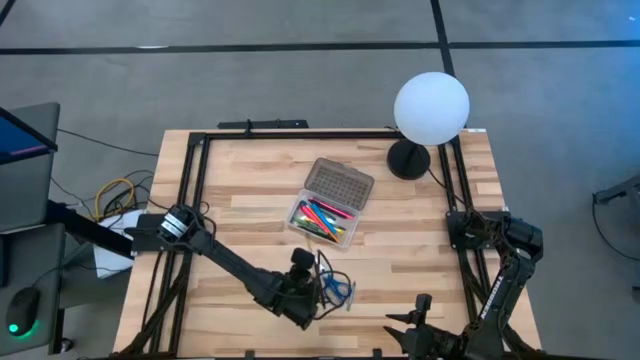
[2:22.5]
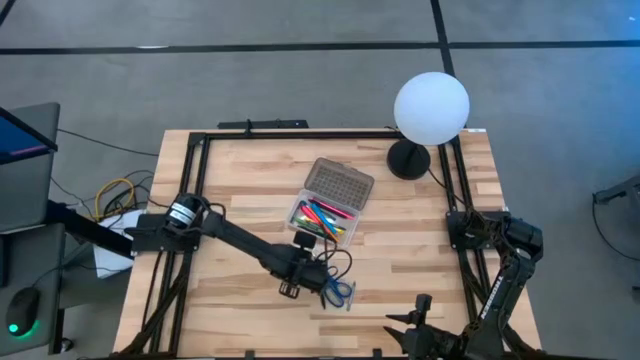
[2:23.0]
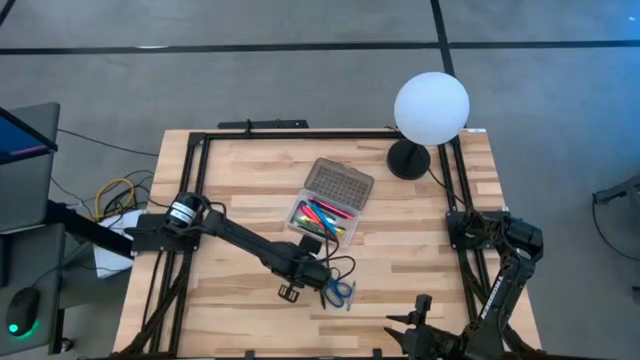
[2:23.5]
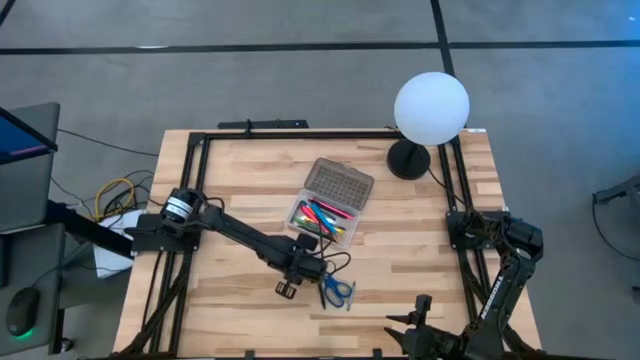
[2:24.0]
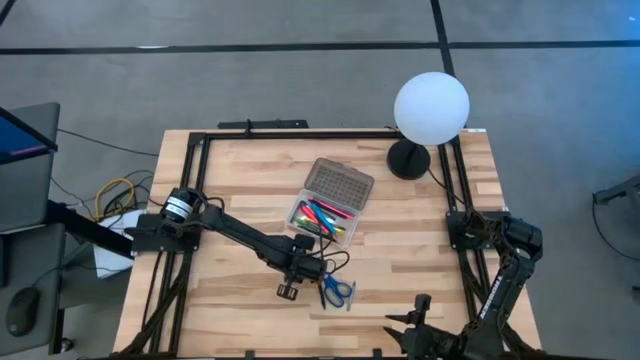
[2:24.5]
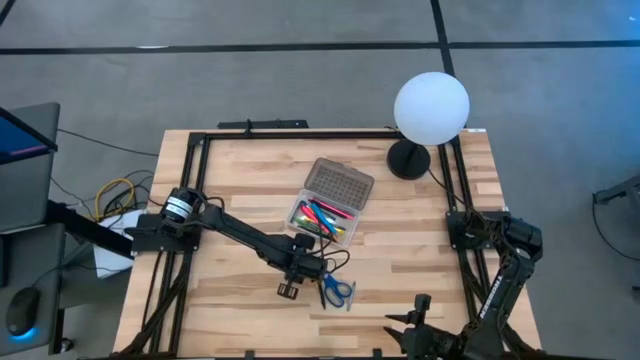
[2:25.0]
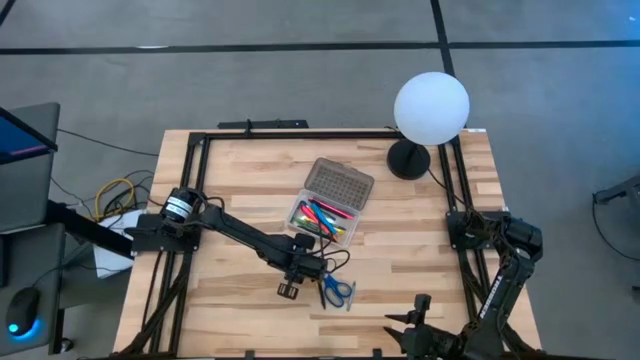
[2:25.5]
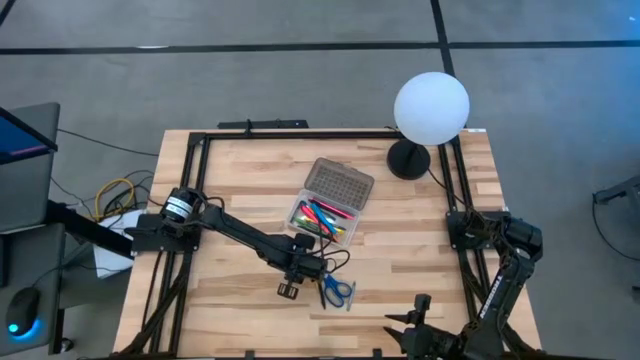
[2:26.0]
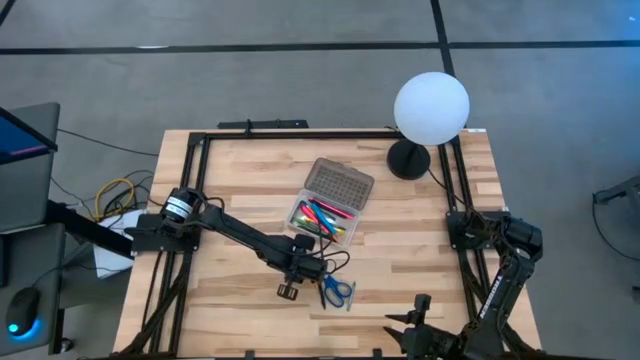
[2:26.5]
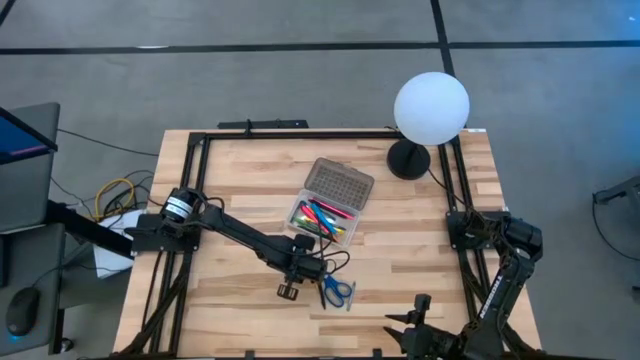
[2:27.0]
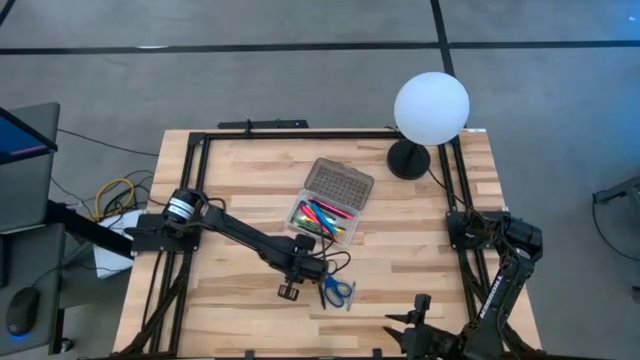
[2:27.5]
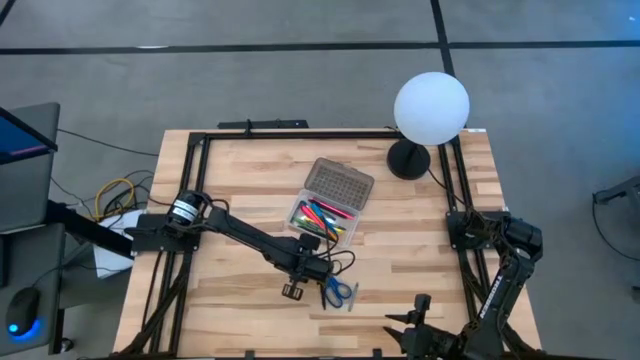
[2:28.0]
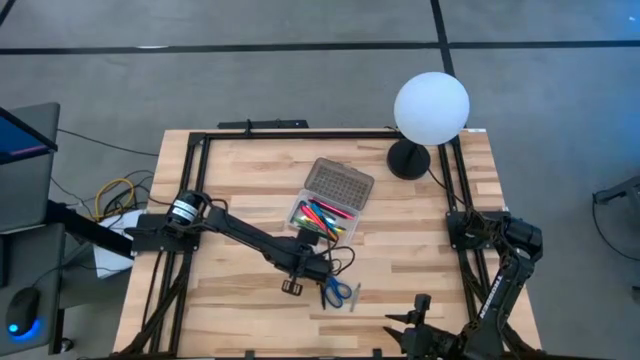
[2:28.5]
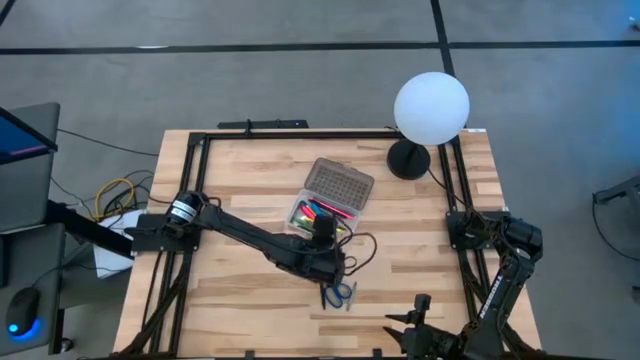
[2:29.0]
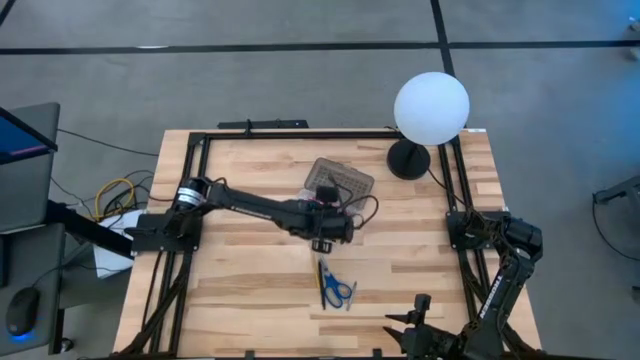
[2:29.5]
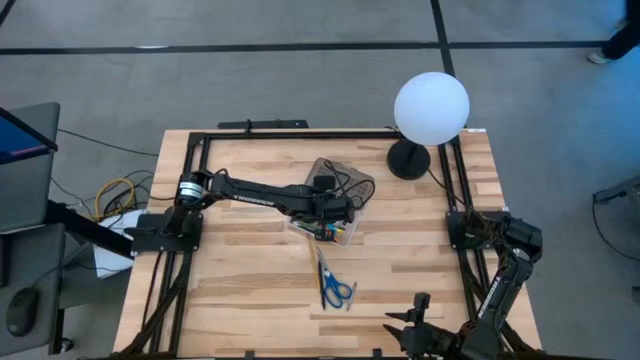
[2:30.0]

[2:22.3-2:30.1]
Task: Pick & place school supplies into a supply box
Put the green crayon into the gray supply box

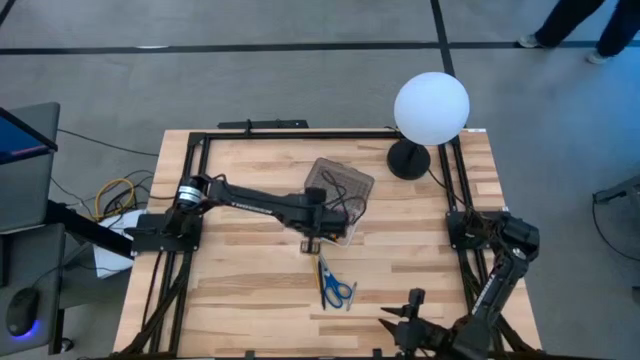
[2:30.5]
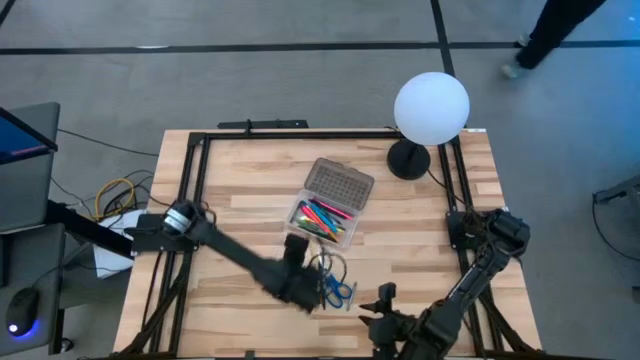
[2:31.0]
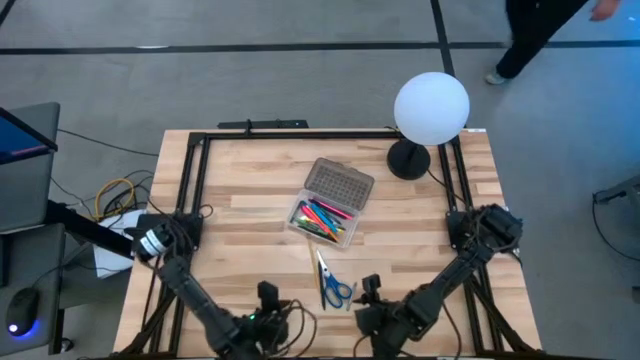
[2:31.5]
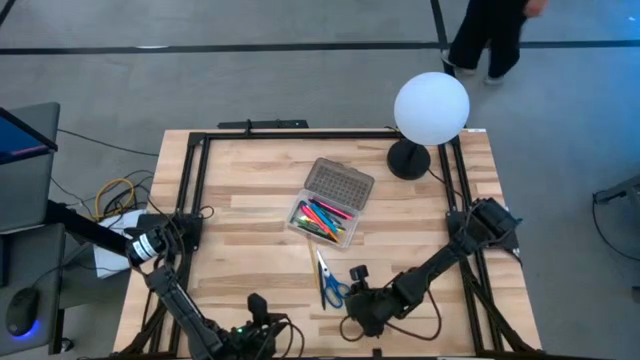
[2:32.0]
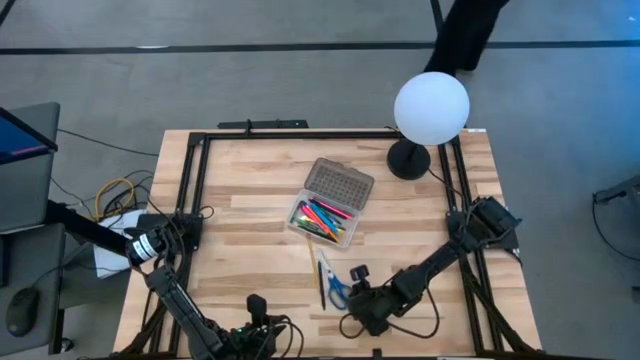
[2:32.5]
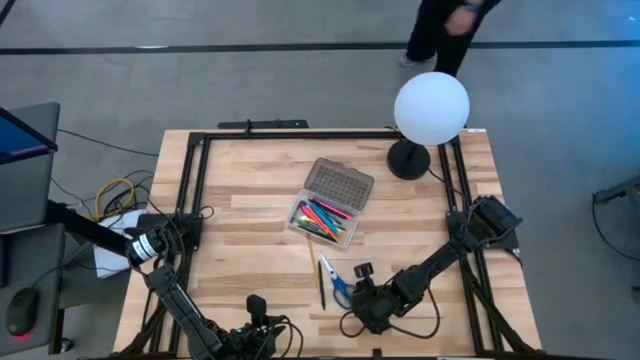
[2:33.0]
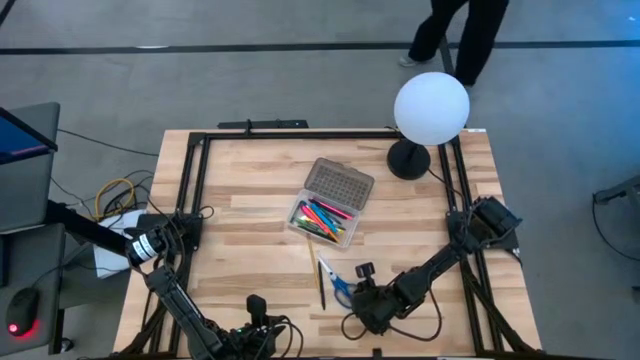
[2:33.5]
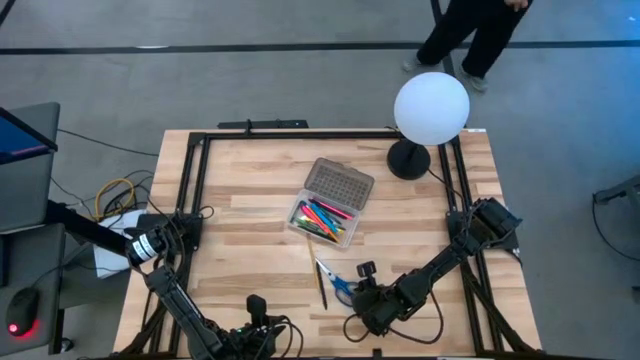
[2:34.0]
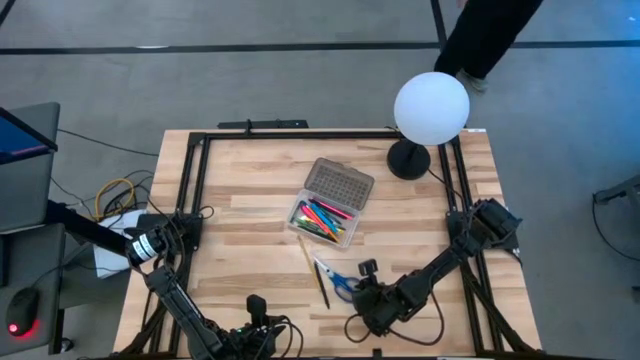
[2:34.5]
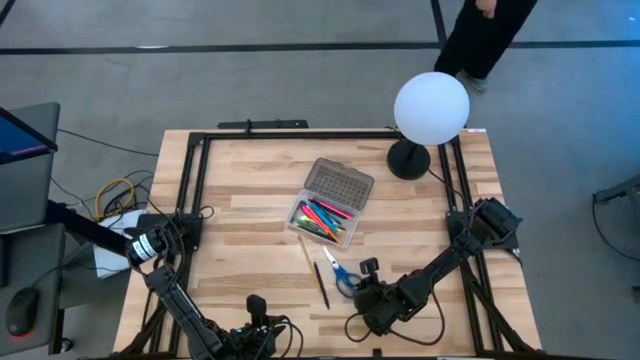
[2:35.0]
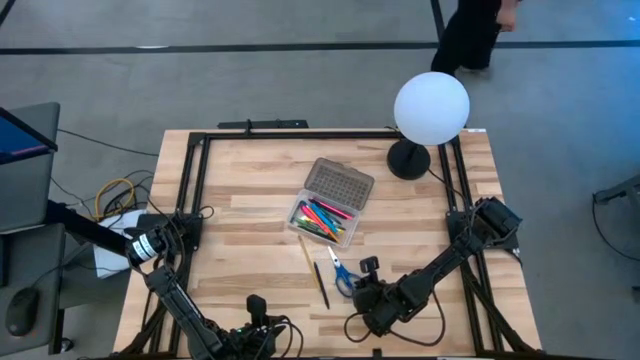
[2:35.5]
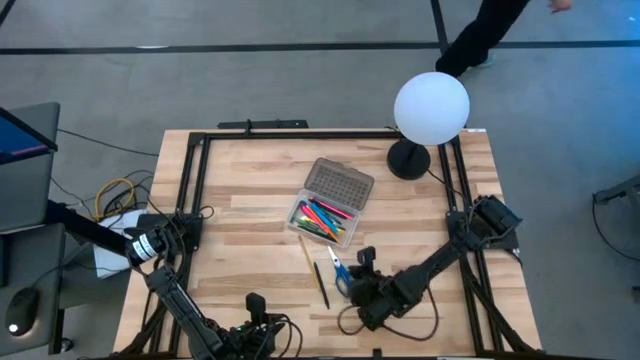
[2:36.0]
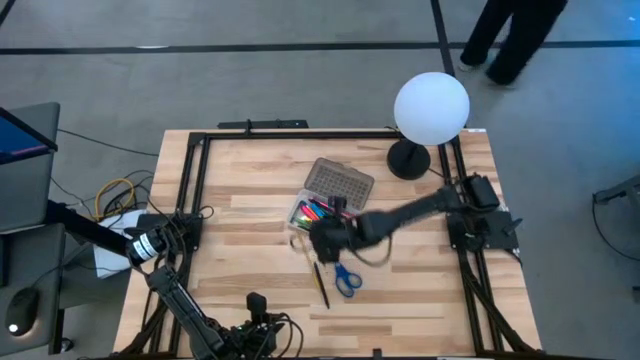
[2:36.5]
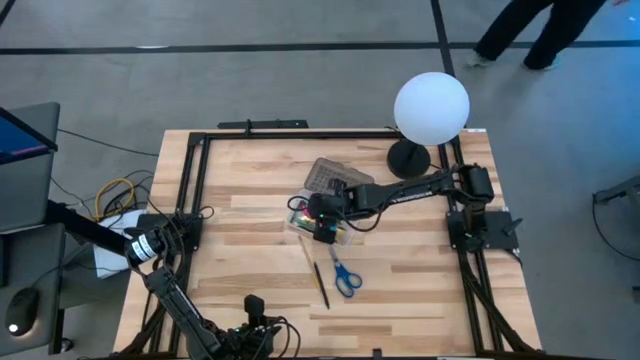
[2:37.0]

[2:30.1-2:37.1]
Put the gray crayon into the gray supply box

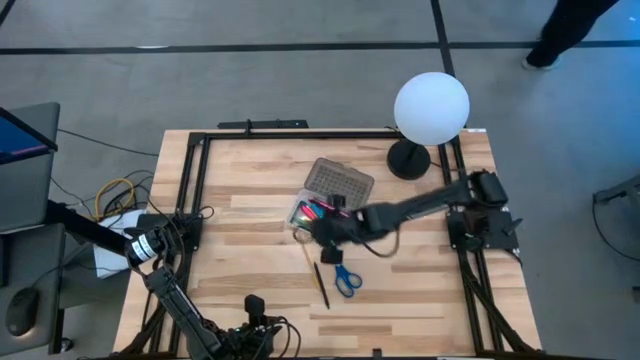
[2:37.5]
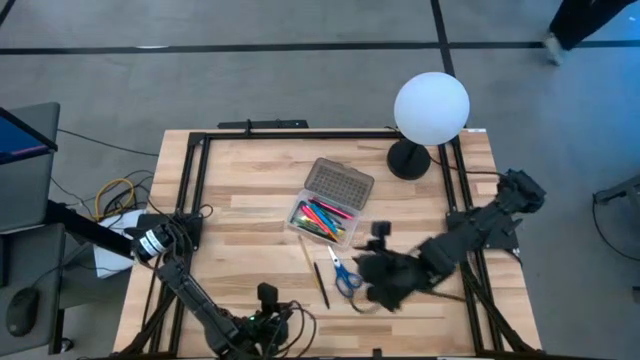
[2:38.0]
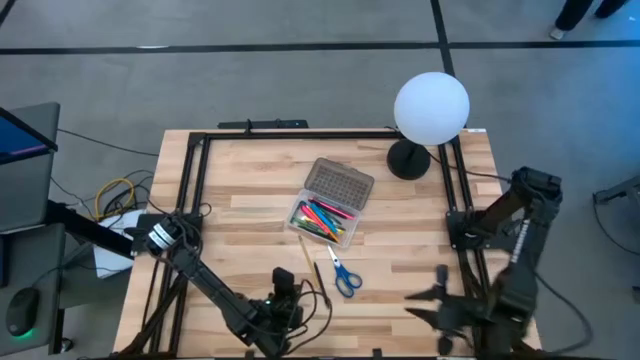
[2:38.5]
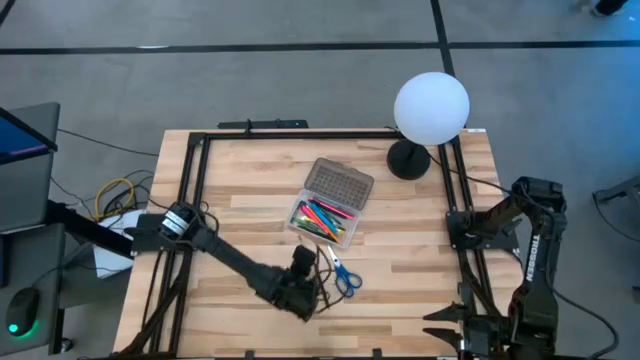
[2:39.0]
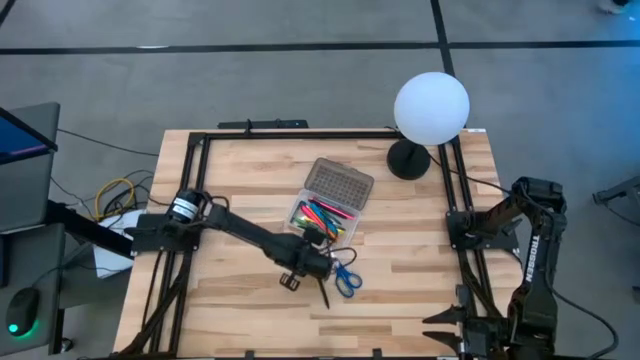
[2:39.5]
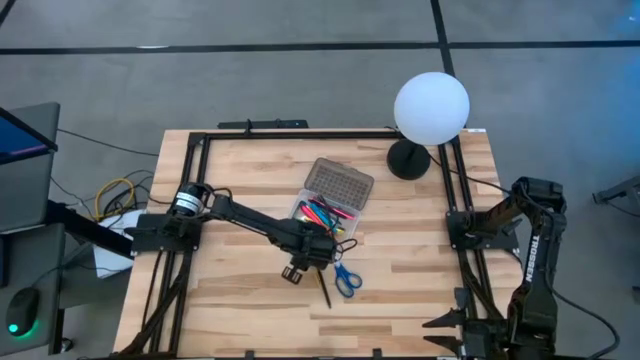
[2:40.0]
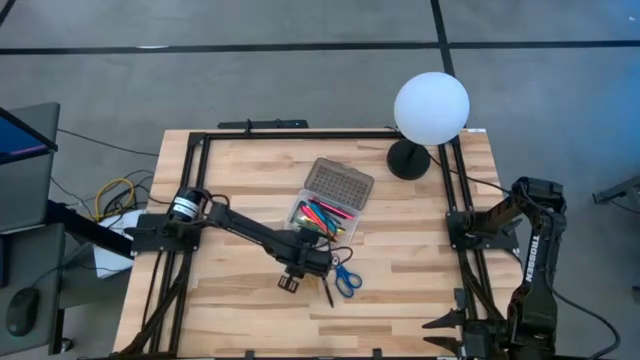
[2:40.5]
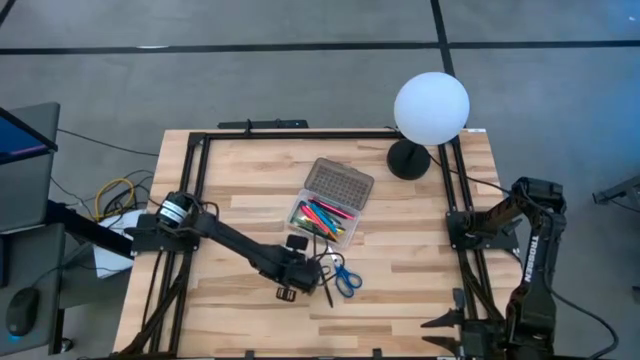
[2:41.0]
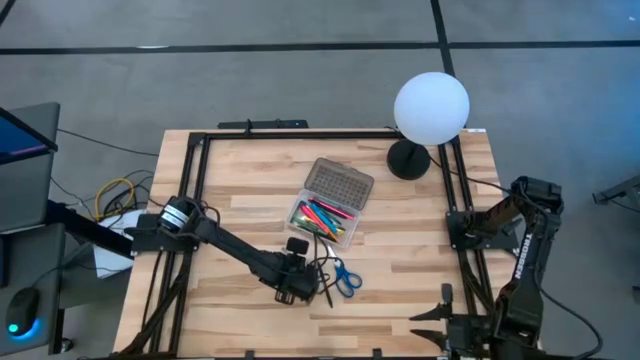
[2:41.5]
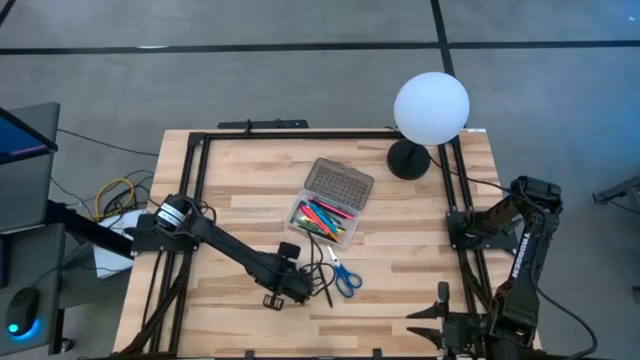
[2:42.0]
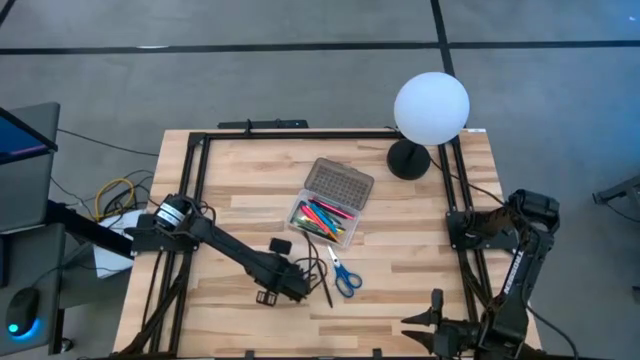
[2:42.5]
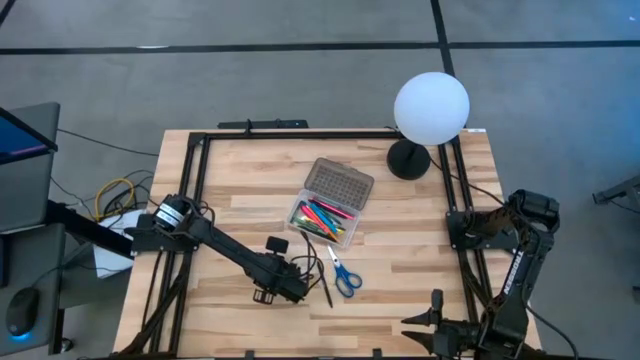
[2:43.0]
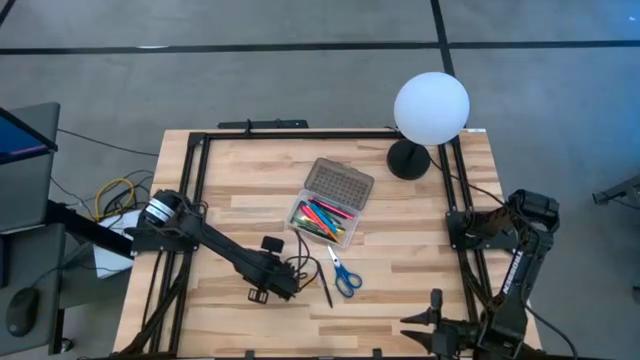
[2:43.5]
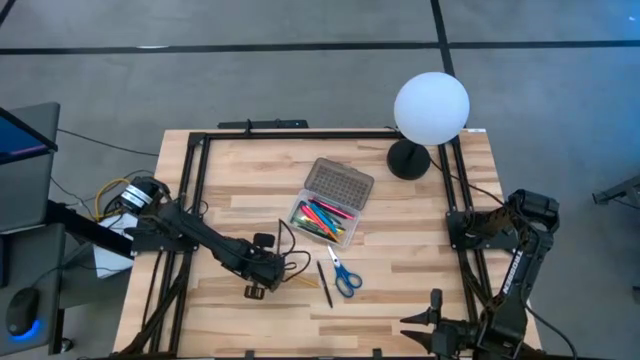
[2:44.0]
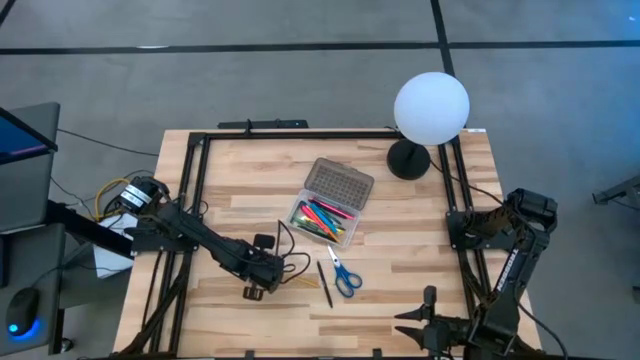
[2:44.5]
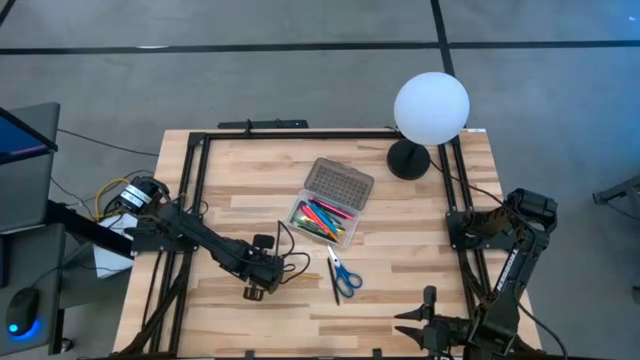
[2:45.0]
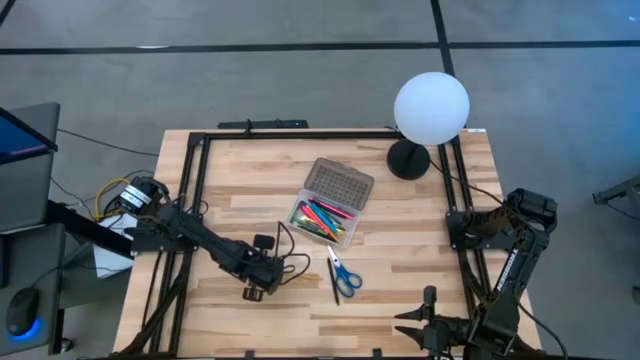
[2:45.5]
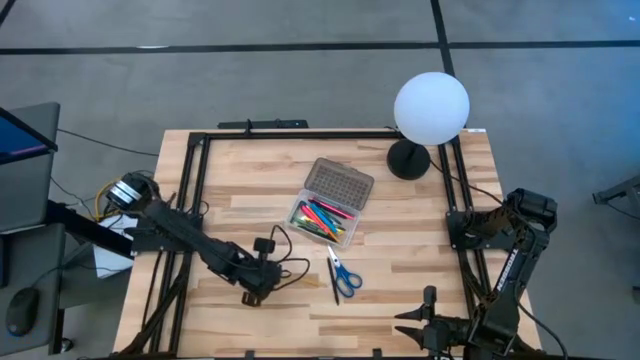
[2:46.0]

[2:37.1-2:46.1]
Put the orange pencil into the gray supply box
